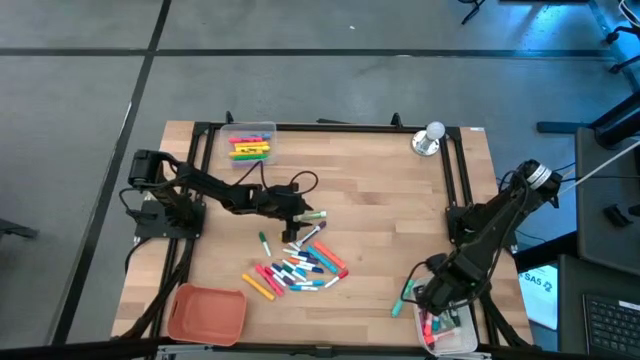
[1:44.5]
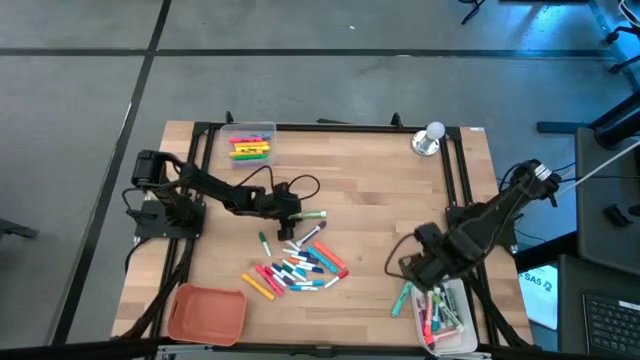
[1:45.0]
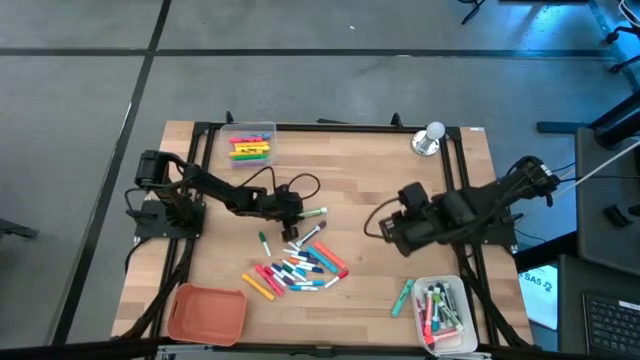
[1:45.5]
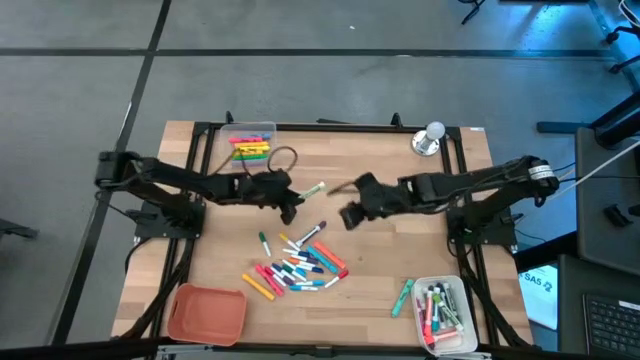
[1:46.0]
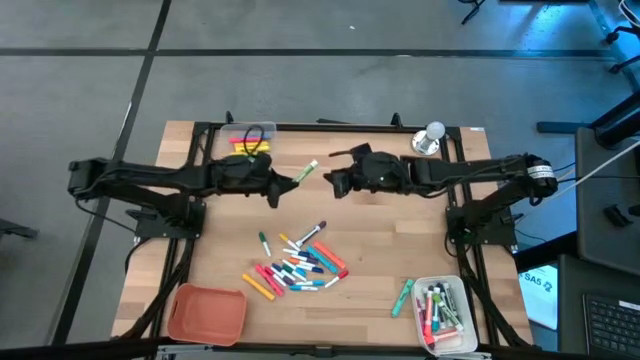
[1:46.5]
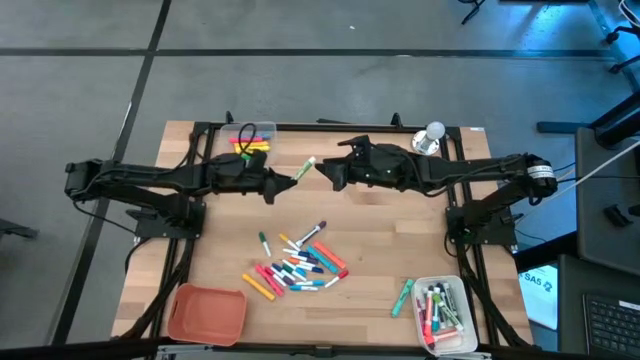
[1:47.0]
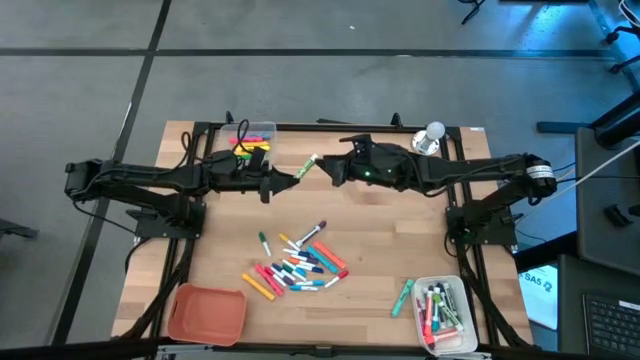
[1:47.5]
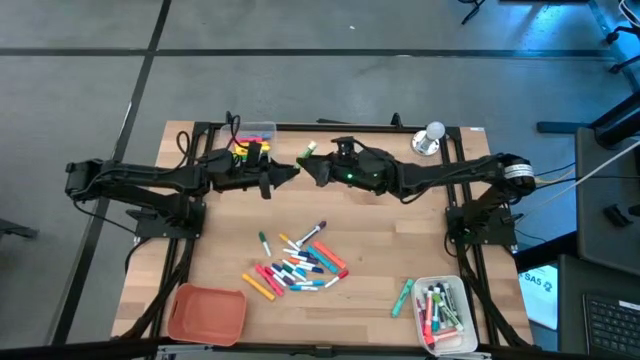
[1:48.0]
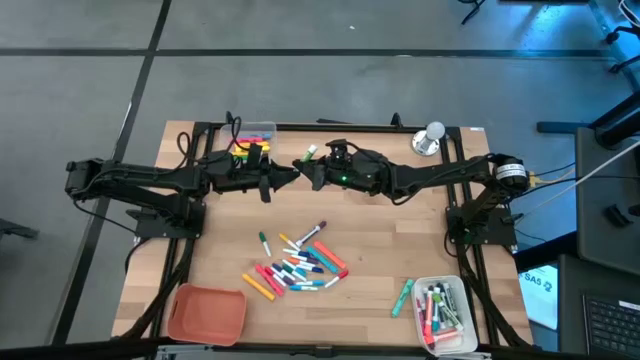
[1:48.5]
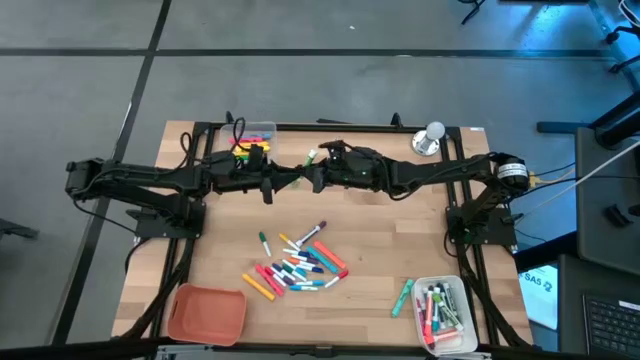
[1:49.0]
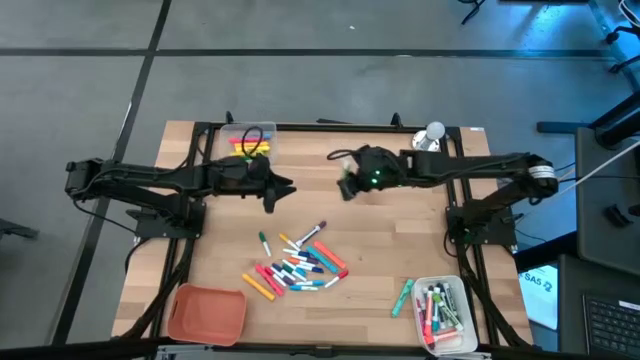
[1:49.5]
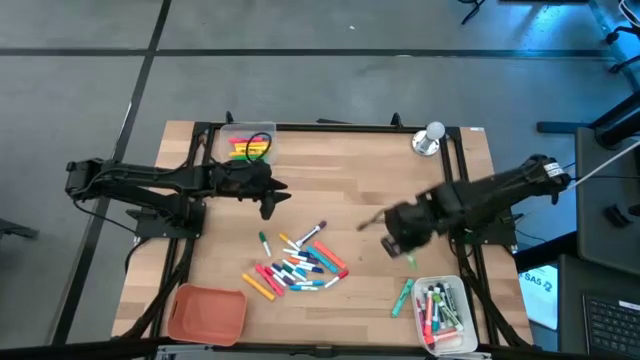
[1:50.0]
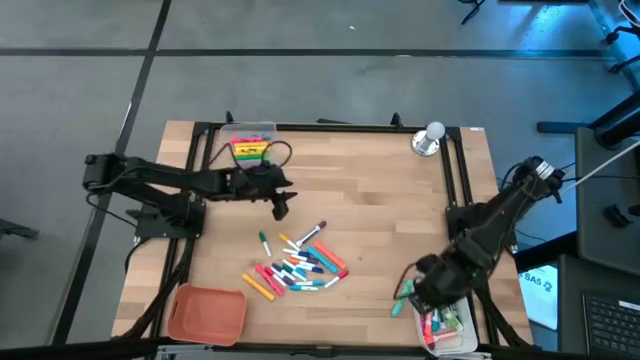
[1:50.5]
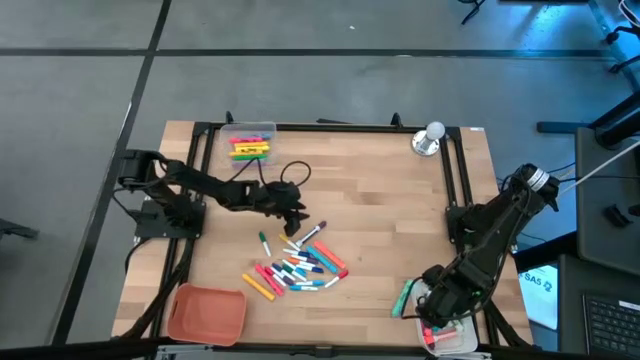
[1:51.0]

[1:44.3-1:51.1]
Task: Pick & Place Markers
Put the middle center pitch green pen into the white bin

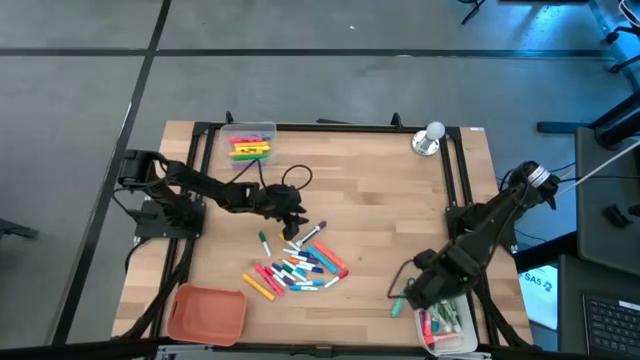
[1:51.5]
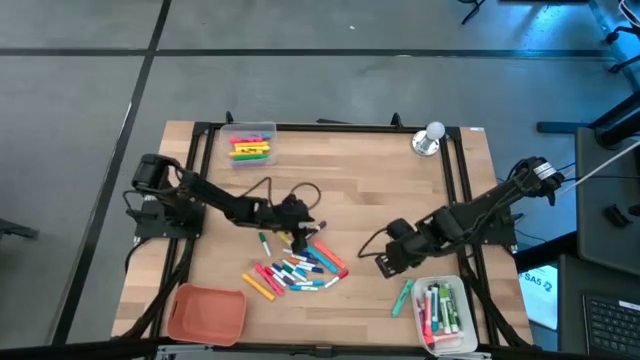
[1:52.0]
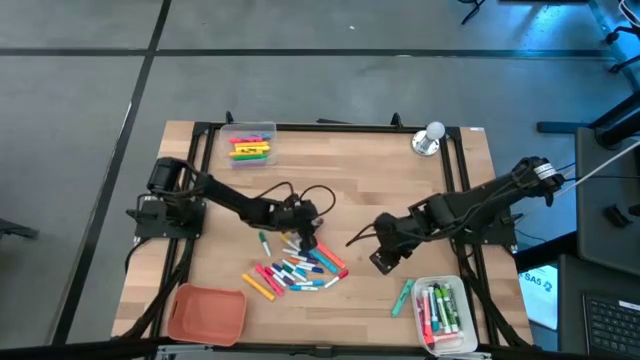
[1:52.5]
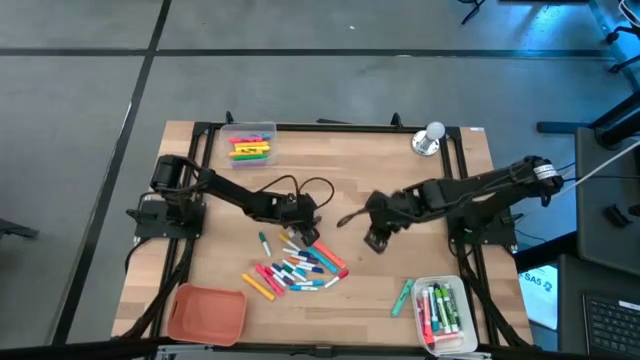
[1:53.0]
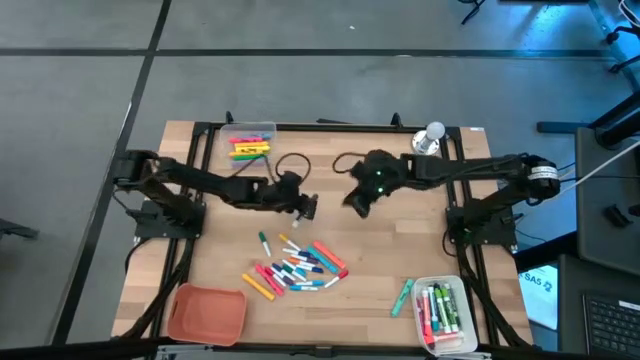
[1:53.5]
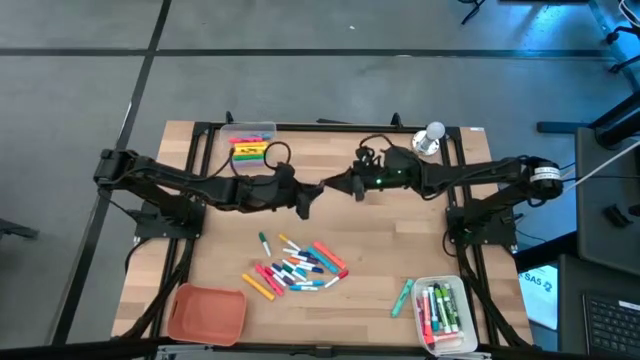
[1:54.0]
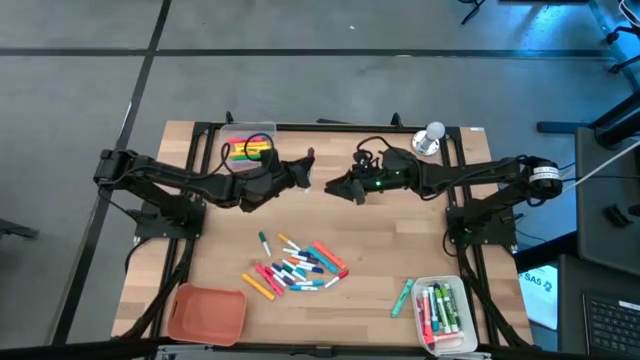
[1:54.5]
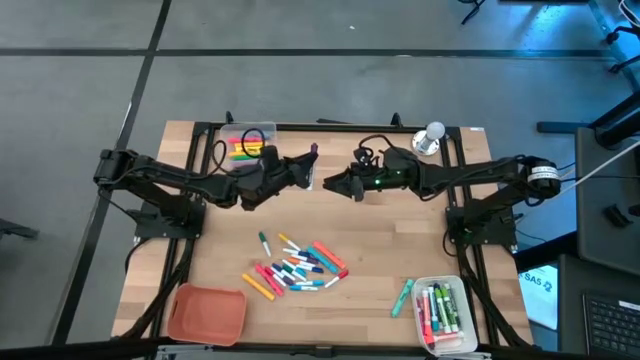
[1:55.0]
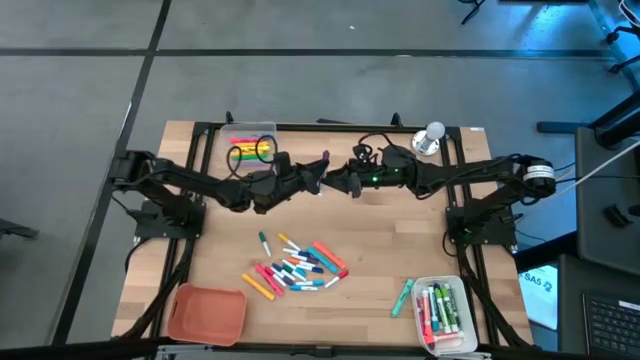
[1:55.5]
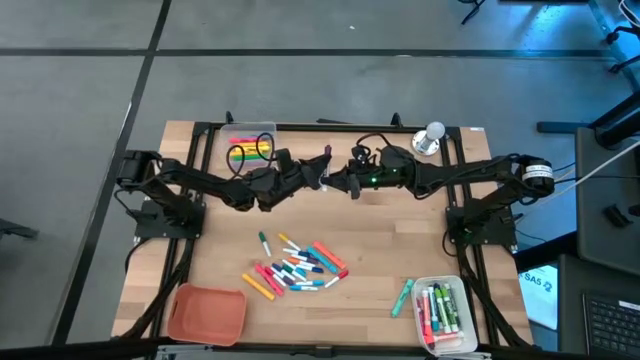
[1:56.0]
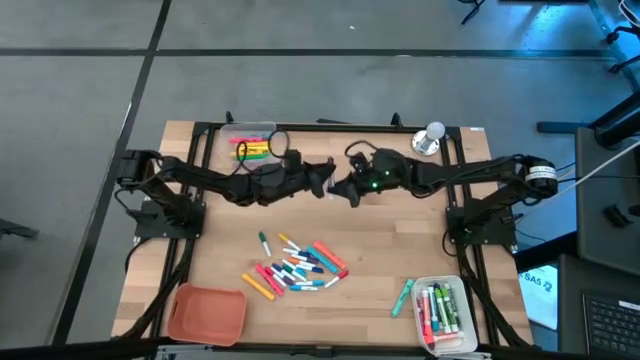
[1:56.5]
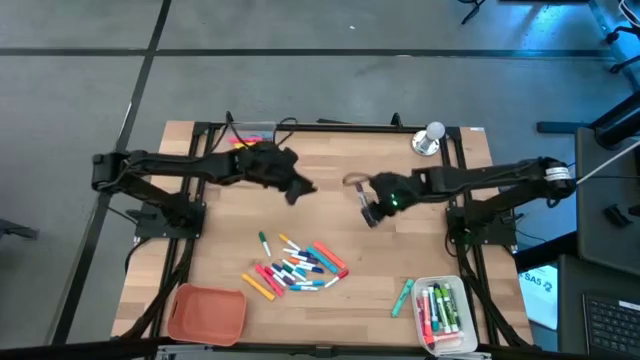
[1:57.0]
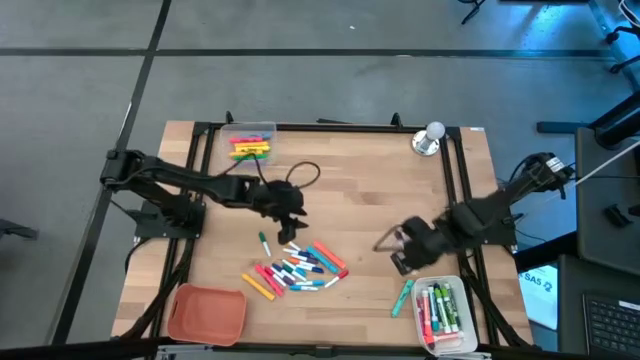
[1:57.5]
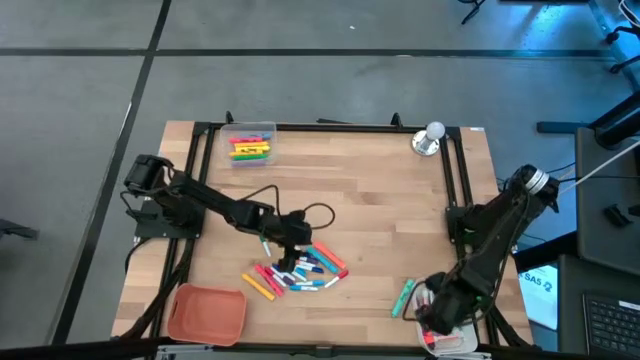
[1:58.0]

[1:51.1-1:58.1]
Put the violet pen into the white bin

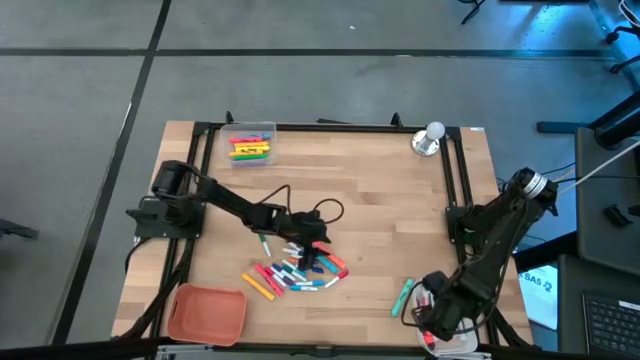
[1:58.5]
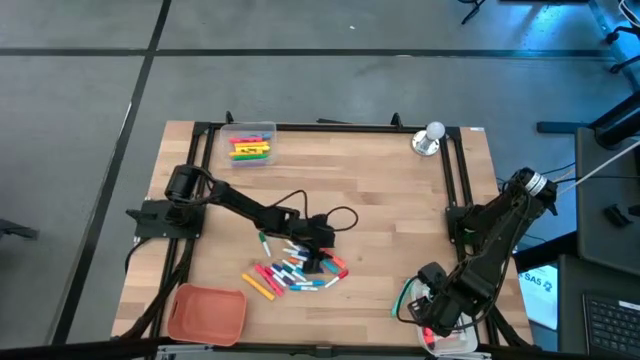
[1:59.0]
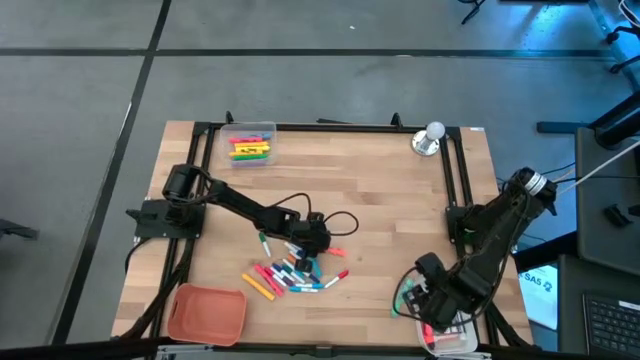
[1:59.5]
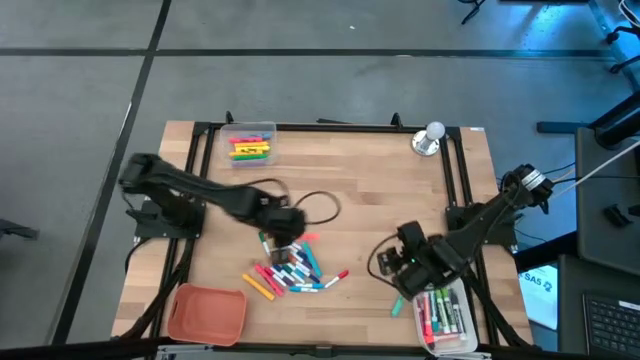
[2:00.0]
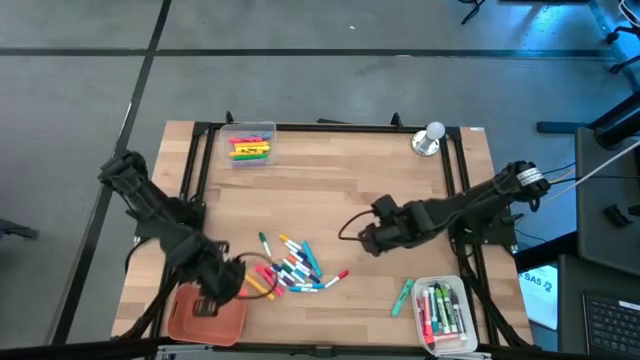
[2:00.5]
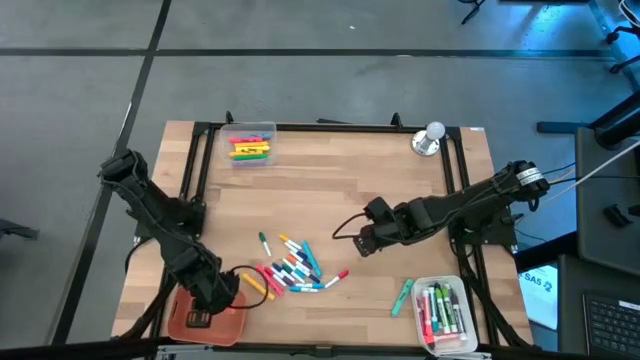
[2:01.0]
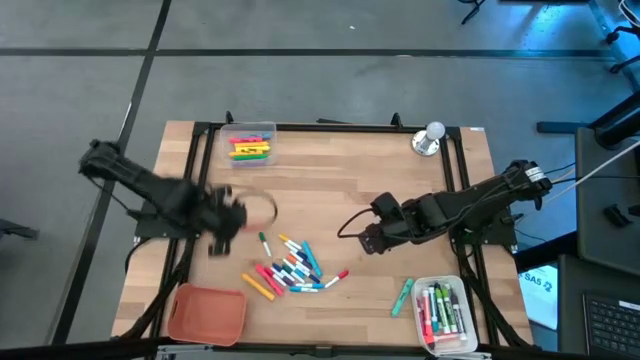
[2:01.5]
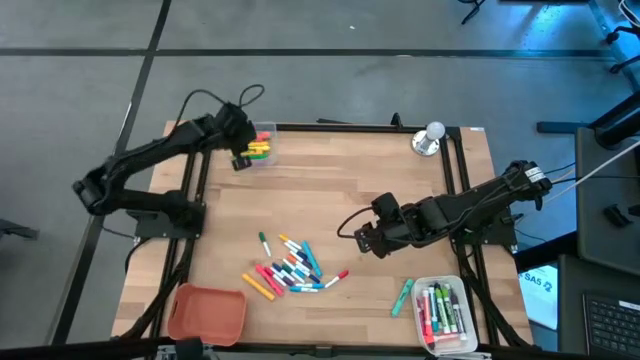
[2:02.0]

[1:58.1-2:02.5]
Put the orange pen into the transparent bin

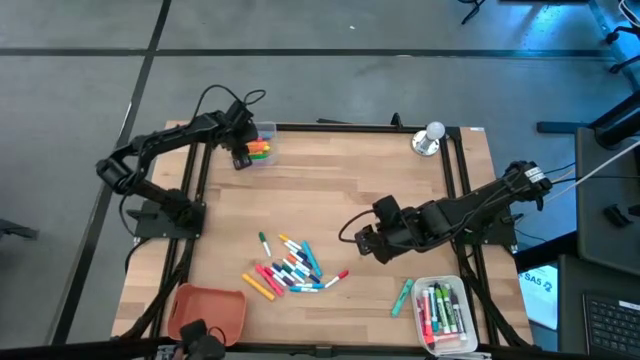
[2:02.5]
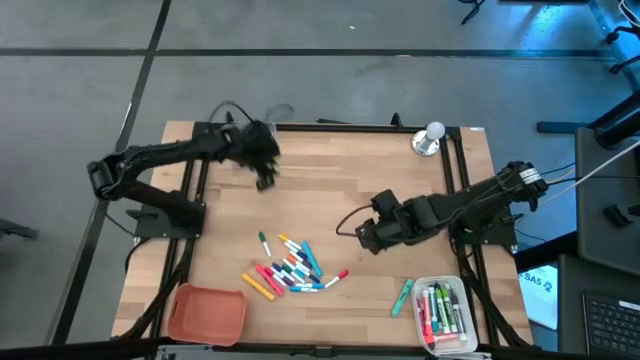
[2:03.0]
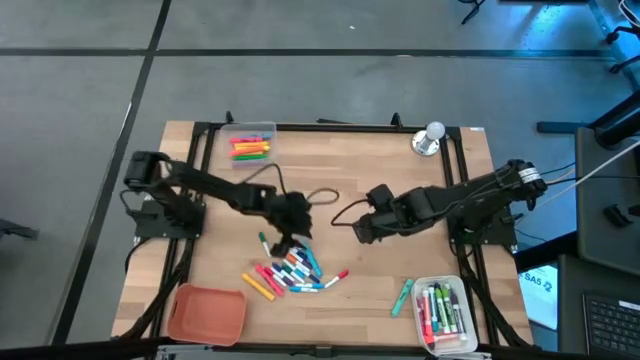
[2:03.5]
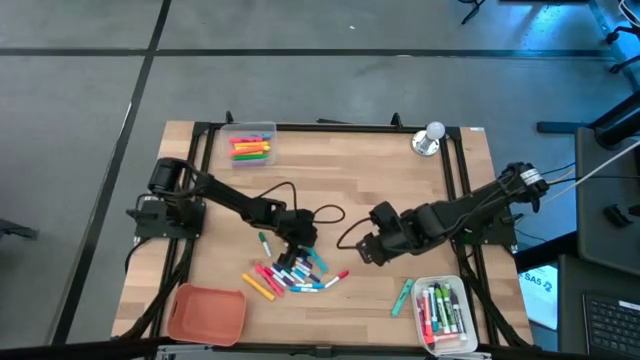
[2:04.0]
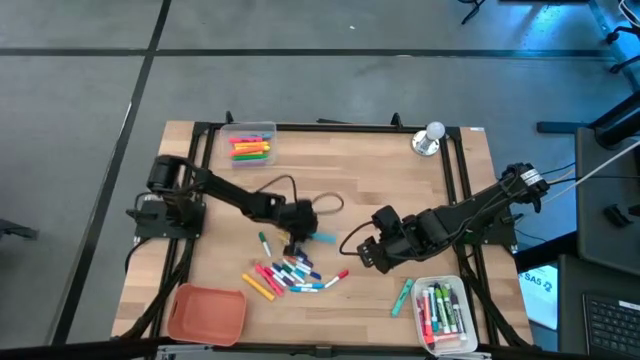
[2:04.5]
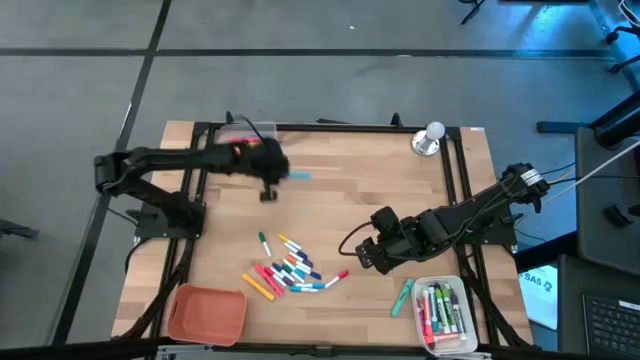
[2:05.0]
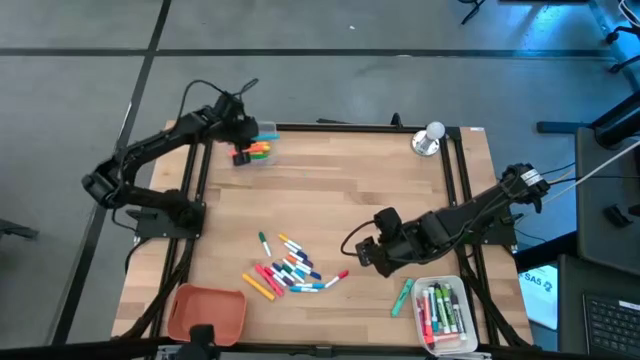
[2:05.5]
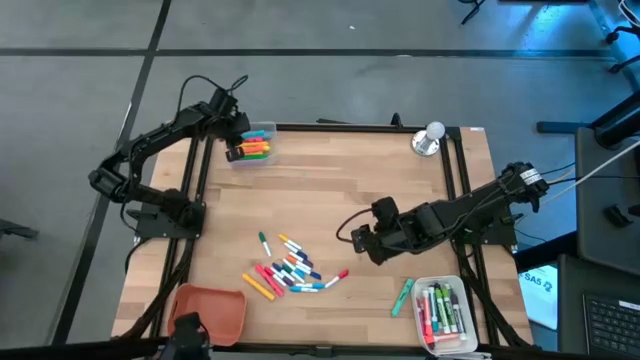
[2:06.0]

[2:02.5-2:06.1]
Put the bottom center pitch blue pen into the transparent bin
